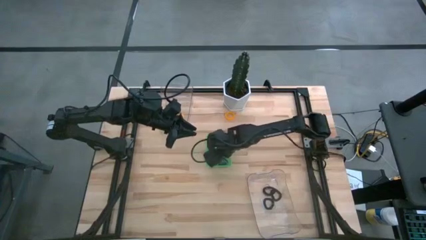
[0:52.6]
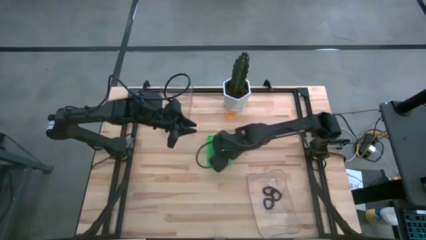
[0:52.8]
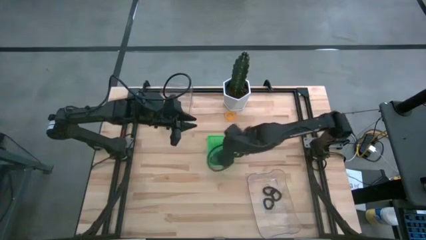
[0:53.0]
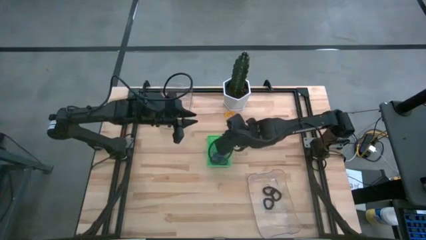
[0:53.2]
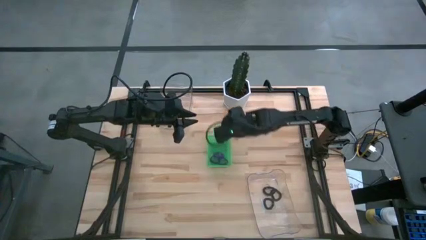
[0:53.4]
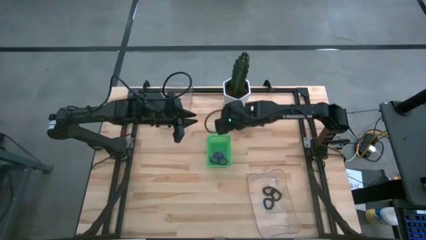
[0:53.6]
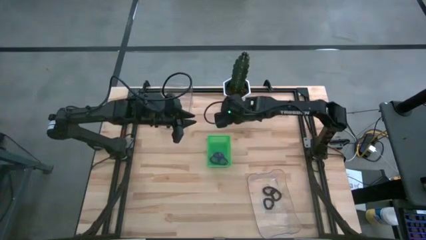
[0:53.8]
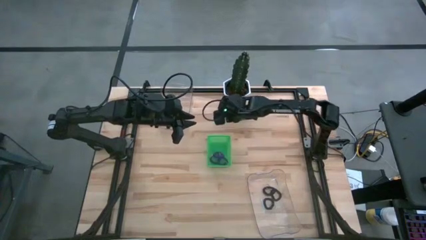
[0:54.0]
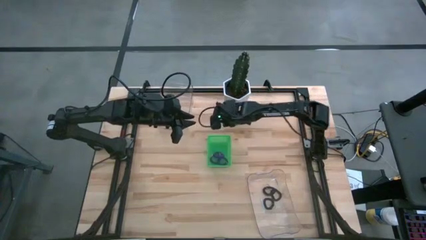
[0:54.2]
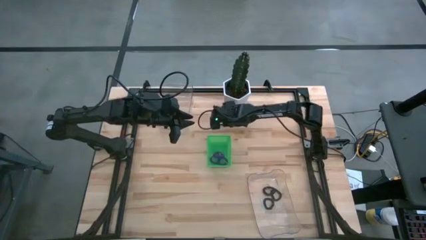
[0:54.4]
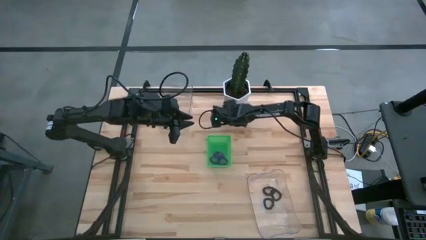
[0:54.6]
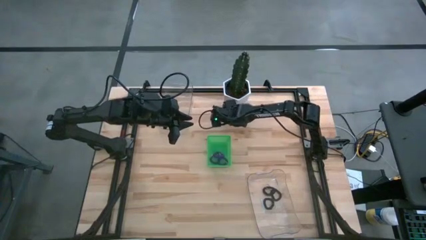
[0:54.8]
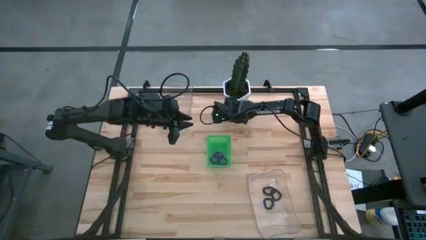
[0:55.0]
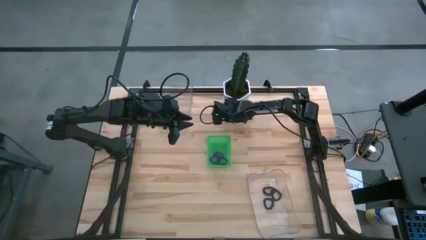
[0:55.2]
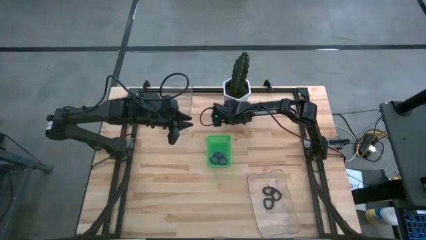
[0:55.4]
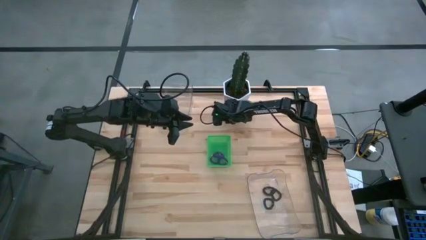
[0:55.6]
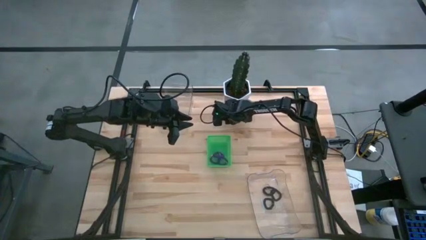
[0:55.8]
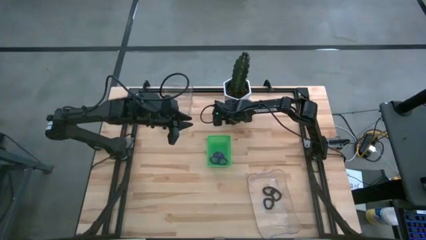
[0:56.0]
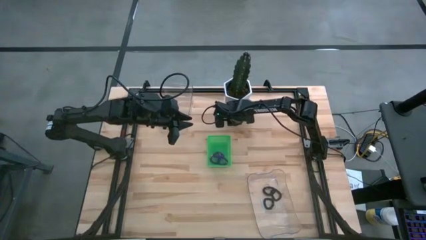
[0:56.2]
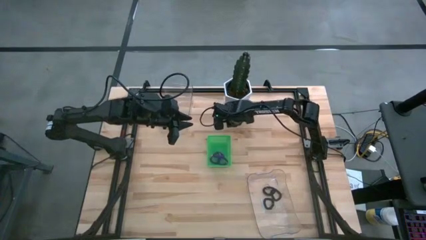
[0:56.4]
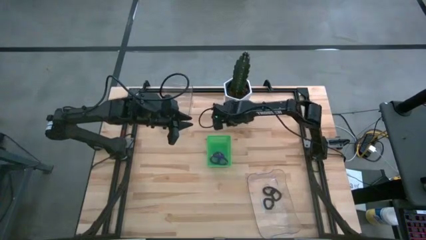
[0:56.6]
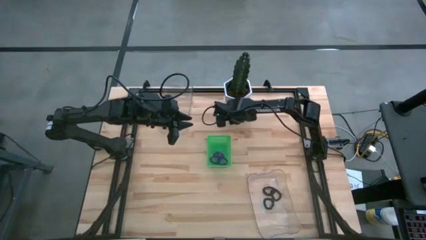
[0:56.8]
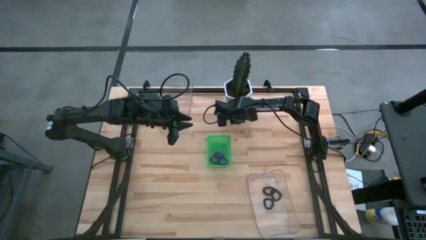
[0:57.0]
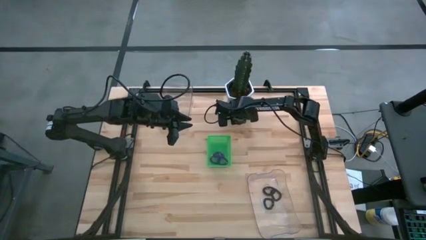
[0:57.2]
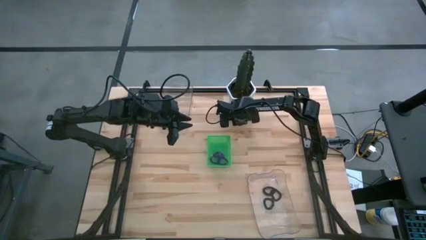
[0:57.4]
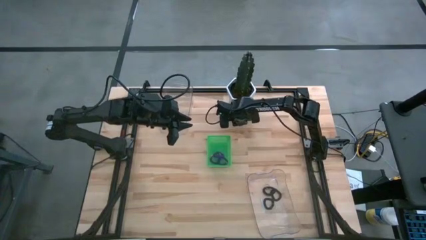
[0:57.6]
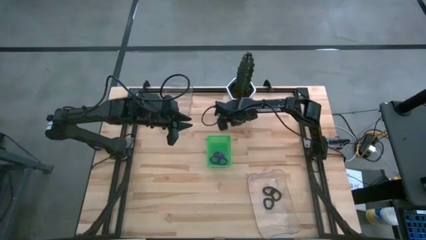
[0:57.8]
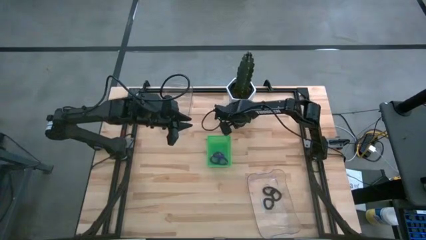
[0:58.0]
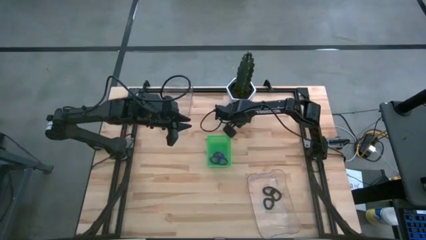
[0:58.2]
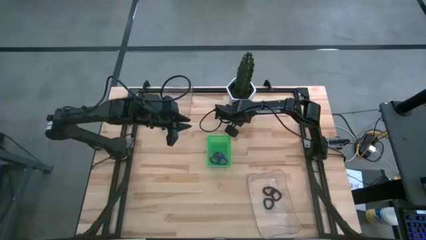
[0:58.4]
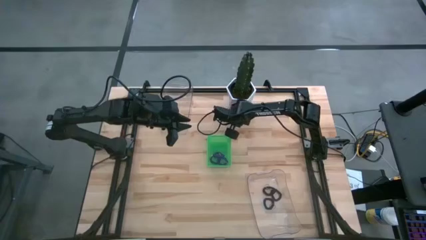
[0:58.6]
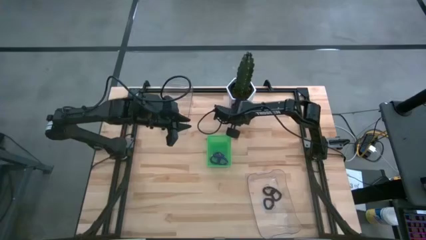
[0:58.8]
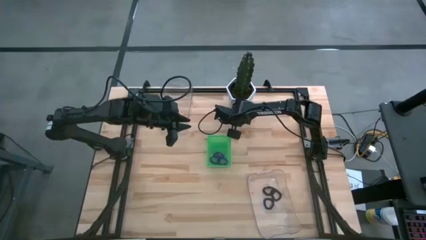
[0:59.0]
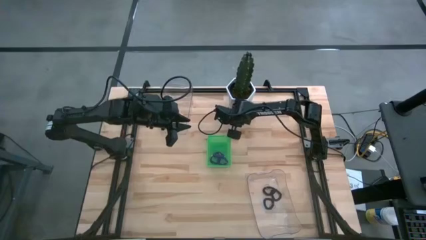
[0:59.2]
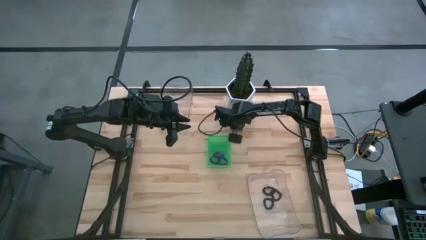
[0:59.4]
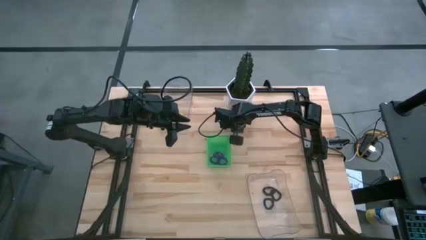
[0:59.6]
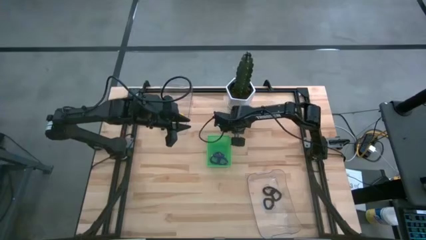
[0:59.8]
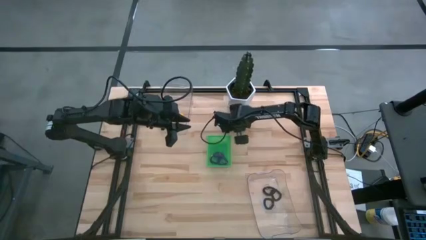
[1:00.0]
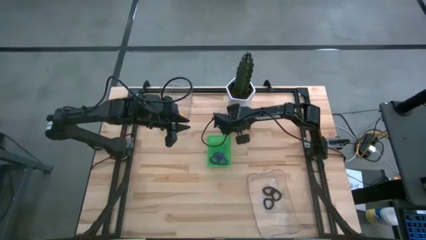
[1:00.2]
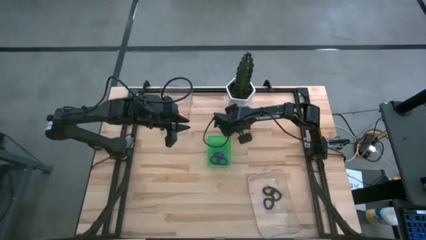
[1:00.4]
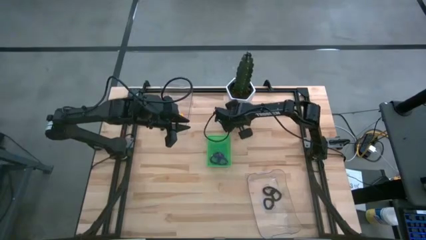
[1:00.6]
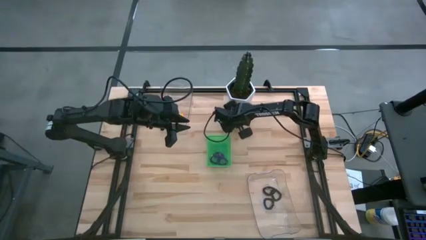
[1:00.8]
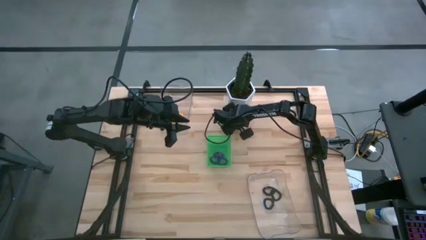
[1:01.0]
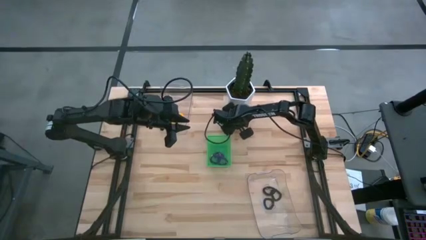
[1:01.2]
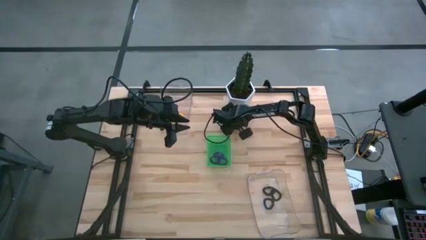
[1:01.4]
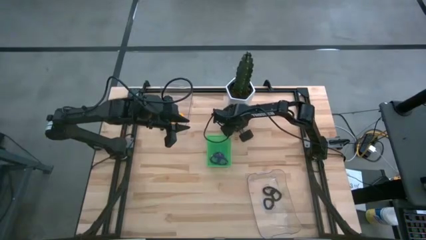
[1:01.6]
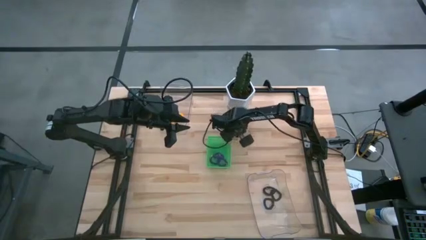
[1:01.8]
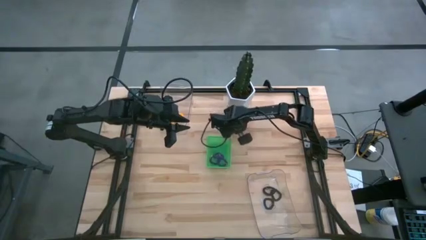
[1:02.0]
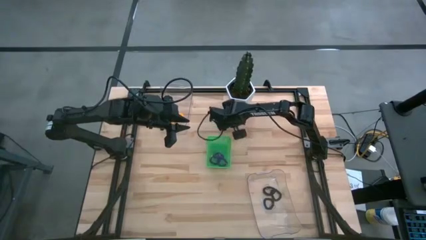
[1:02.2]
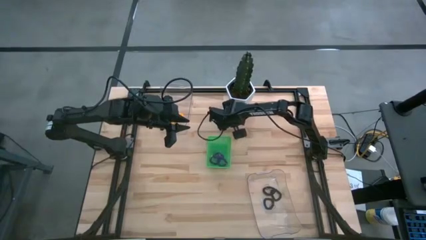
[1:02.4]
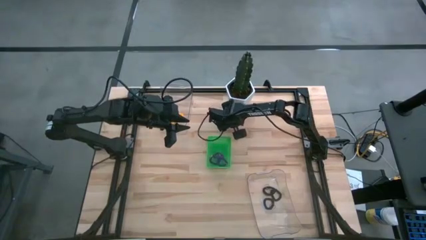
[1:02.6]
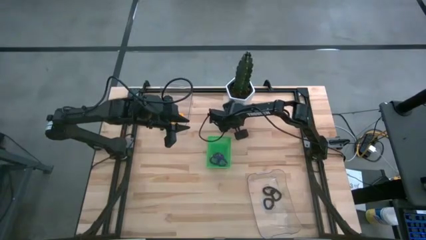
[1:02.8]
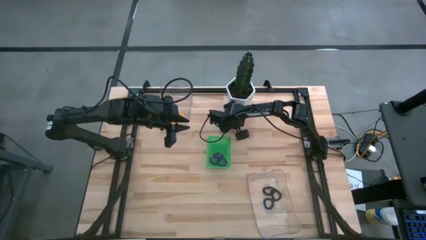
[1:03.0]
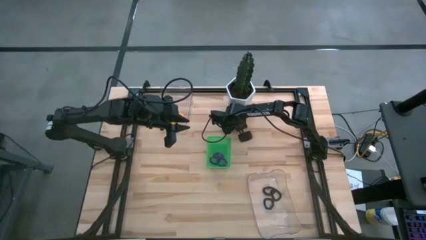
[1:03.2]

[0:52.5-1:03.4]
Task: Sort spring keychains
Put the yellow spring keychain into the top transparent bin
